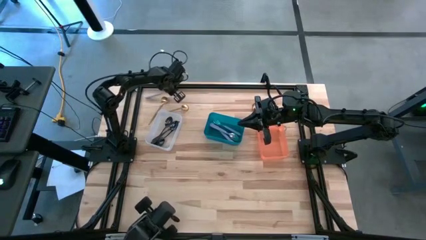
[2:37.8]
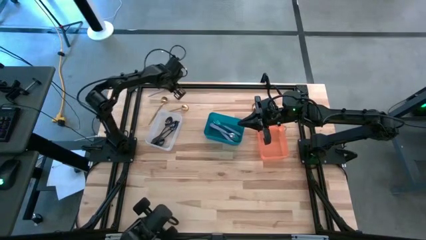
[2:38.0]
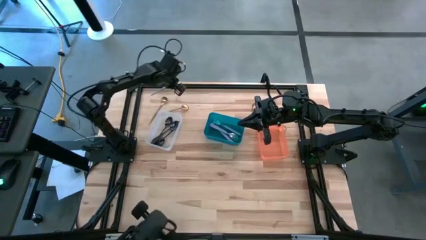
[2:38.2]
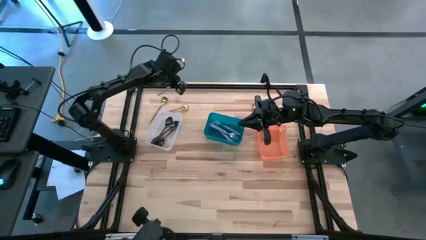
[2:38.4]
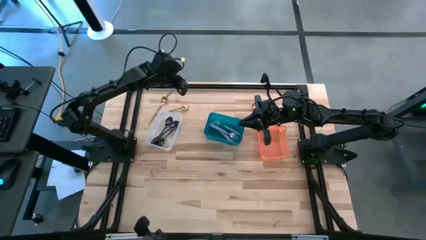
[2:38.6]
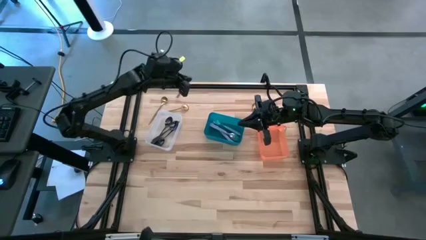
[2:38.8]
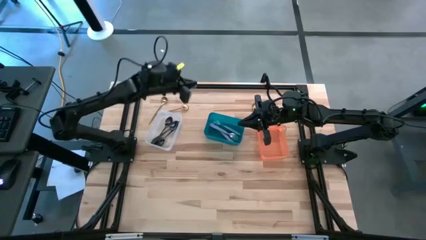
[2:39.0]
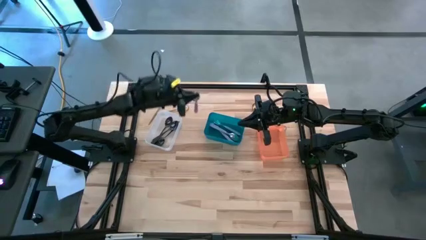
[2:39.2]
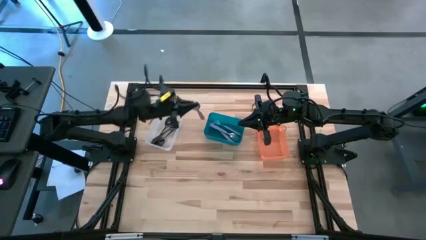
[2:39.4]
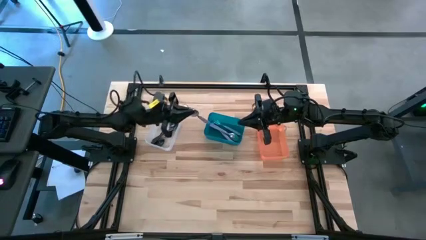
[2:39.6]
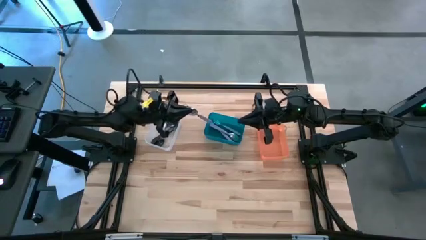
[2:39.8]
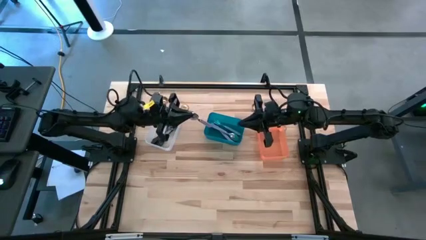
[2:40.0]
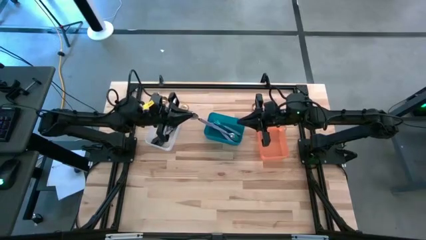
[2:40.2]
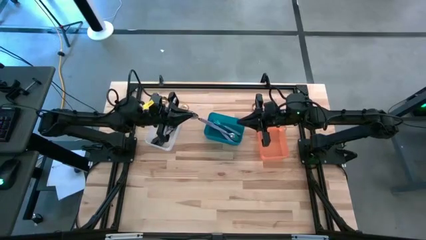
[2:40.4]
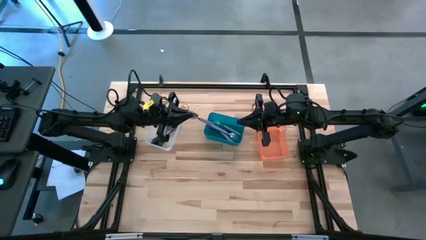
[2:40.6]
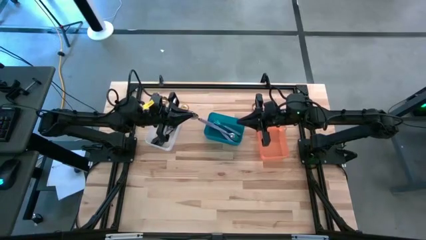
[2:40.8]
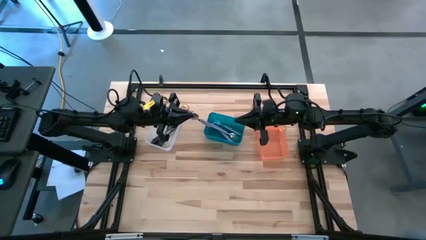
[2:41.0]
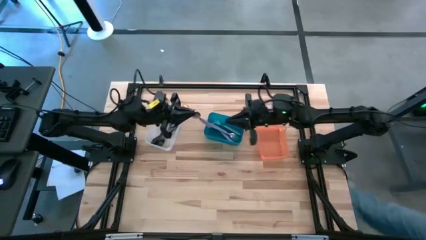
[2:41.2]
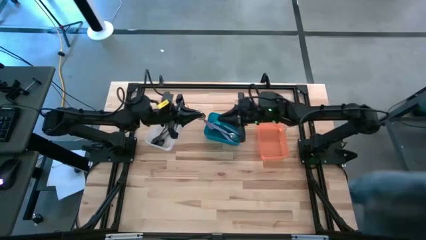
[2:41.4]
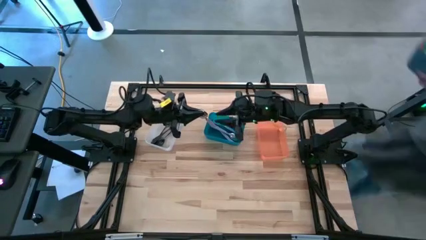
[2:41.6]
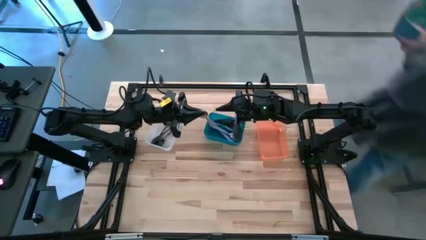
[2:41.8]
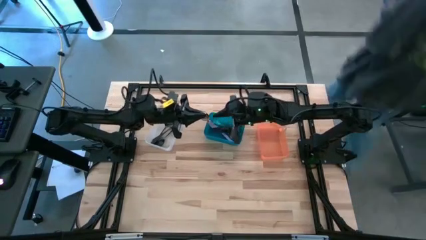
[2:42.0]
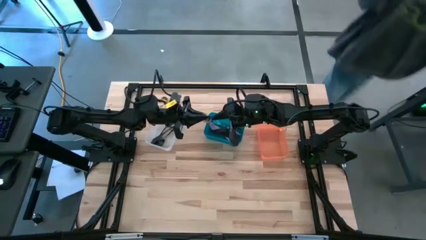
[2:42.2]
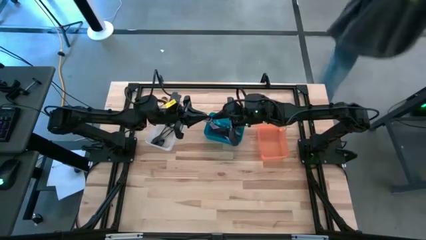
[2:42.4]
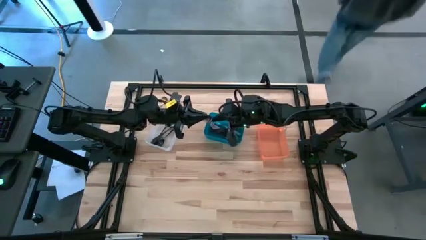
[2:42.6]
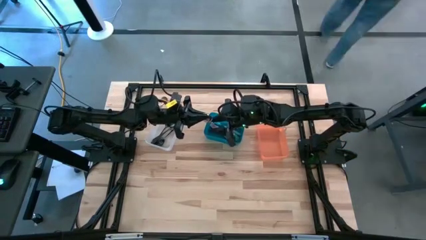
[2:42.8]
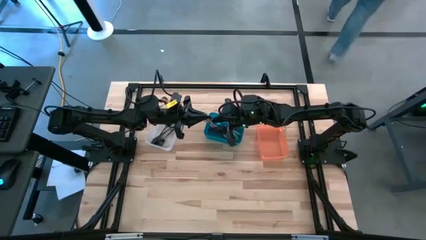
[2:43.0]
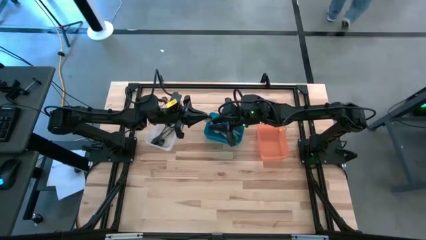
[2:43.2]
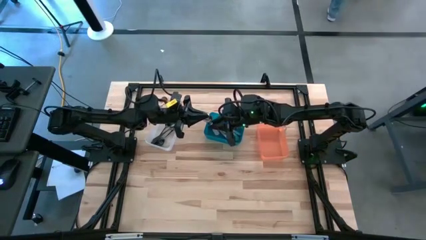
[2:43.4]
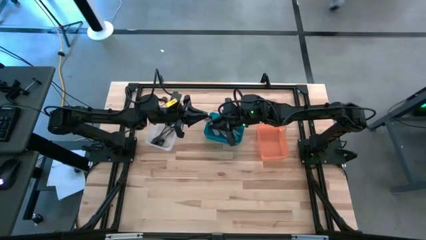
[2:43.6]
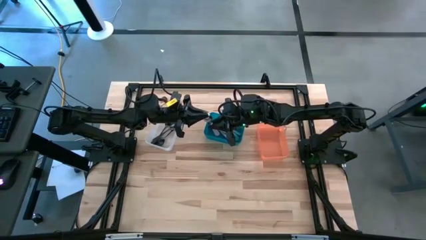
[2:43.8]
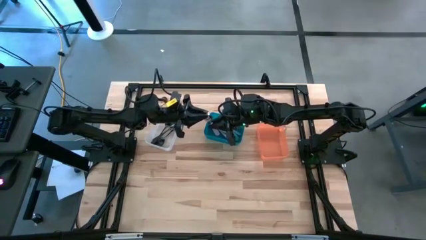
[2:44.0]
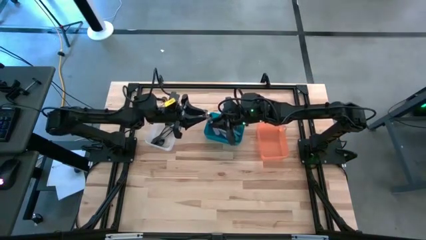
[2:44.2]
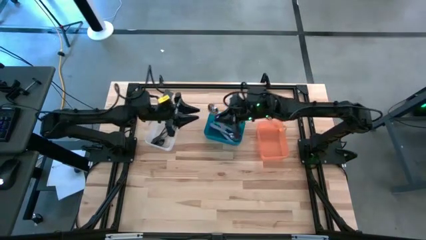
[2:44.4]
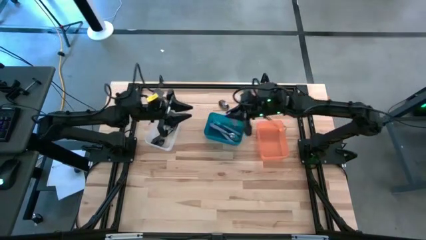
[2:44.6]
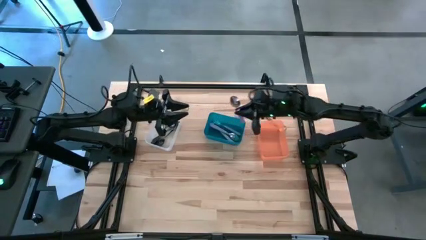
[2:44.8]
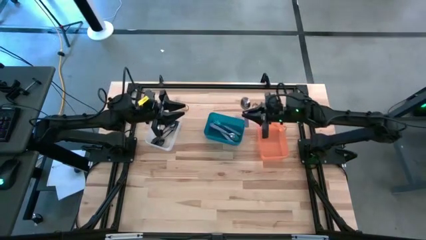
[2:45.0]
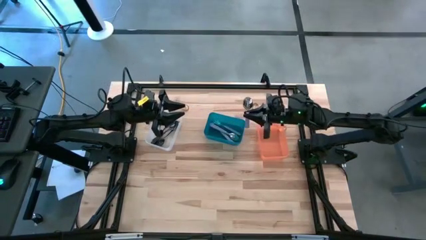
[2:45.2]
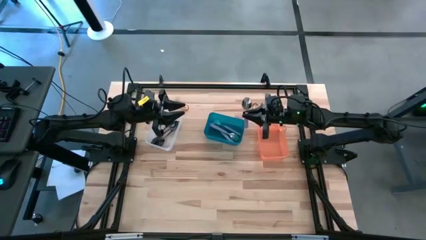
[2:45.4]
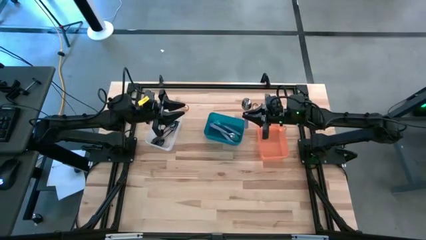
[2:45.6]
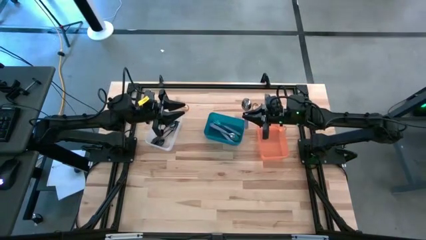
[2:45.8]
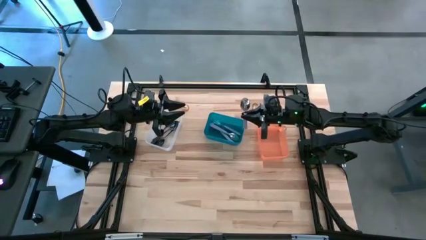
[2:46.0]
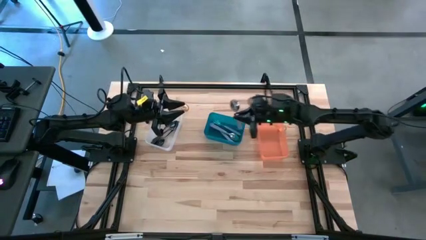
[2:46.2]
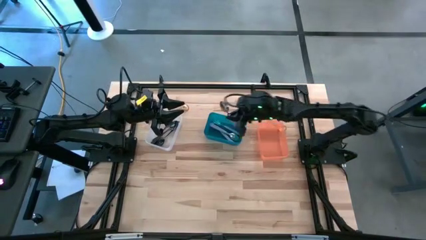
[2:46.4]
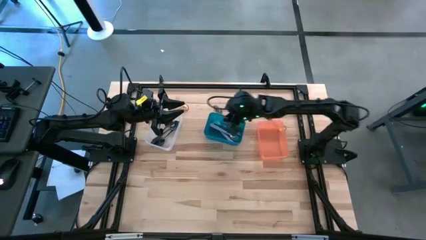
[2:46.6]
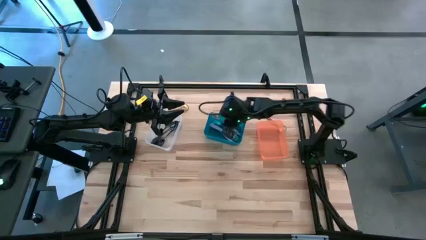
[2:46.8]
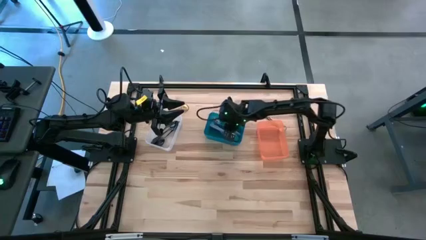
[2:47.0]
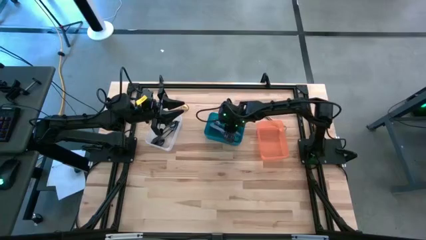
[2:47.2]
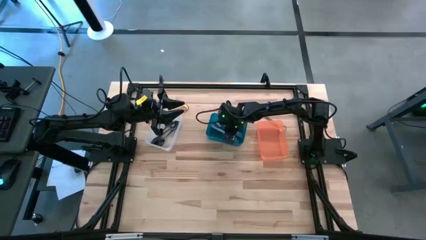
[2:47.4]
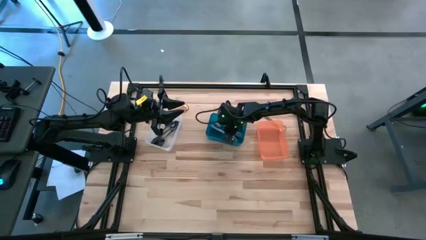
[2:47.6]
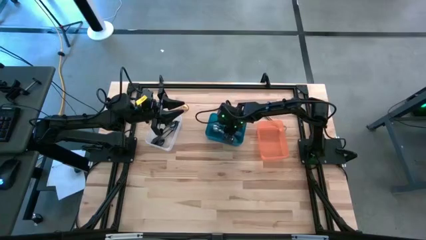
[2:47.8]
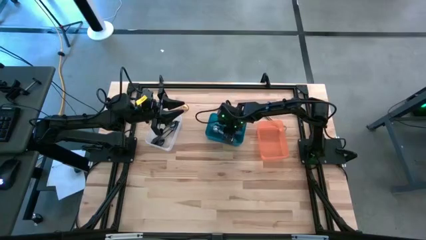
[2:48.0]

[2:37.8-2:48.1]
Task: Sort silverware by color (type)
Put the purple spoon into the blue bin

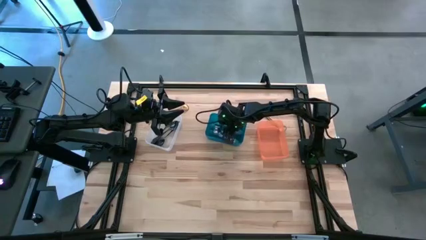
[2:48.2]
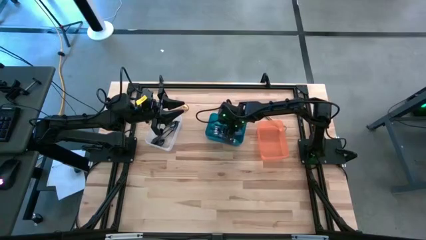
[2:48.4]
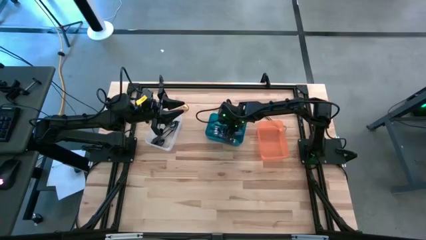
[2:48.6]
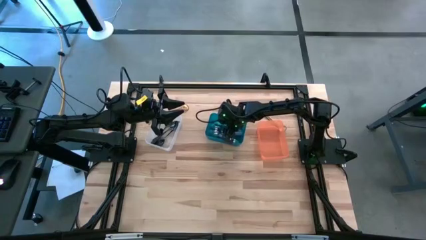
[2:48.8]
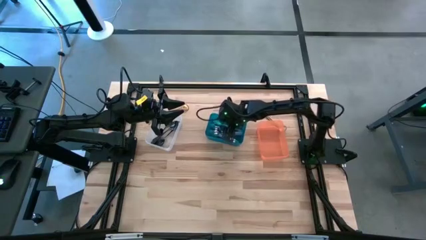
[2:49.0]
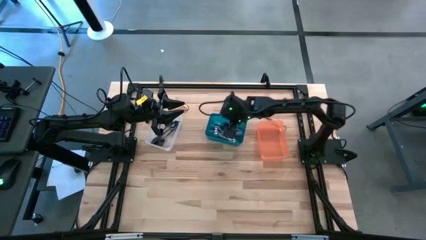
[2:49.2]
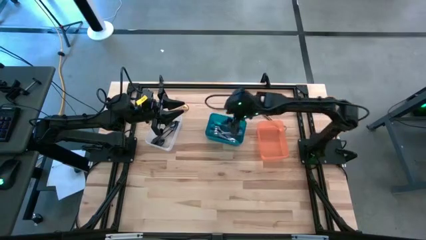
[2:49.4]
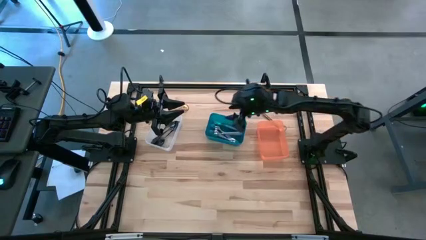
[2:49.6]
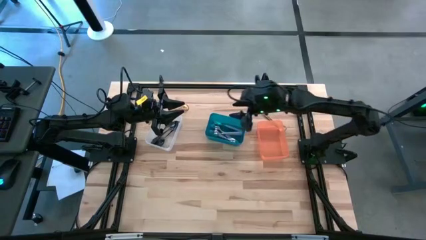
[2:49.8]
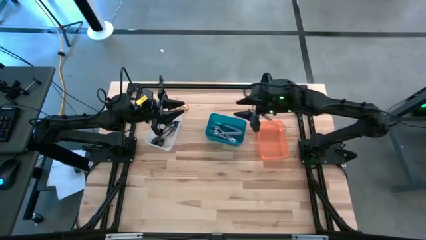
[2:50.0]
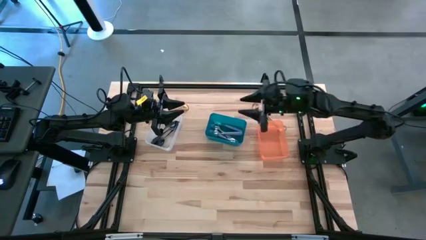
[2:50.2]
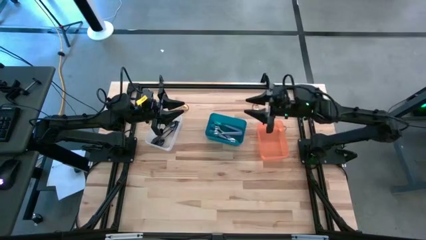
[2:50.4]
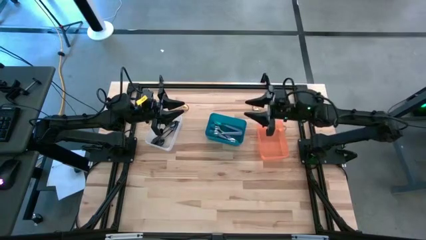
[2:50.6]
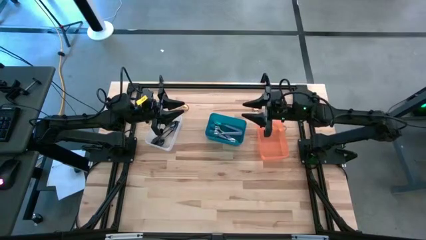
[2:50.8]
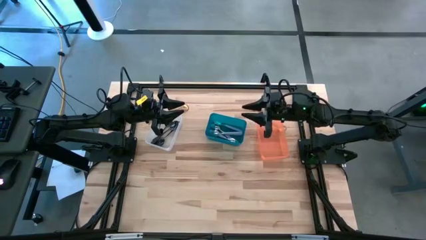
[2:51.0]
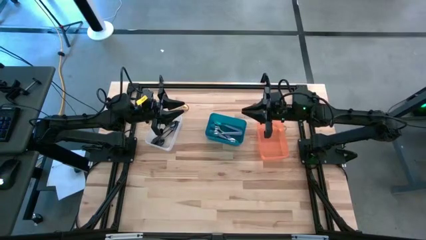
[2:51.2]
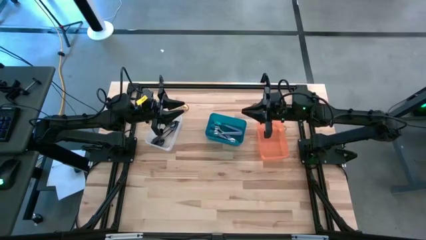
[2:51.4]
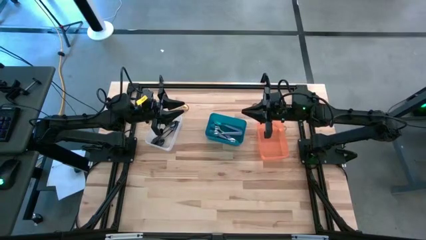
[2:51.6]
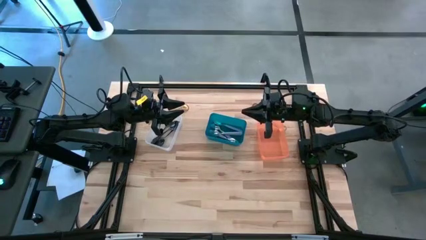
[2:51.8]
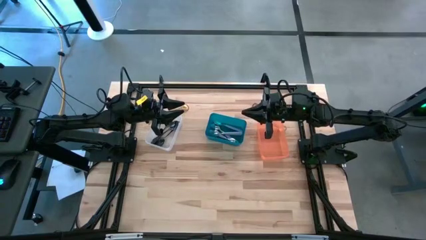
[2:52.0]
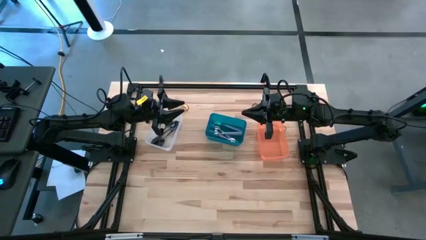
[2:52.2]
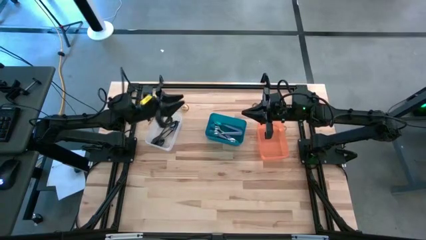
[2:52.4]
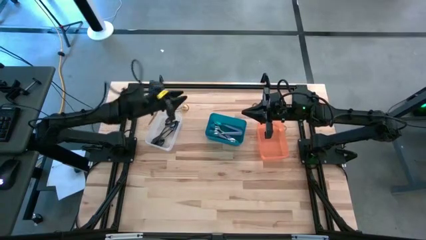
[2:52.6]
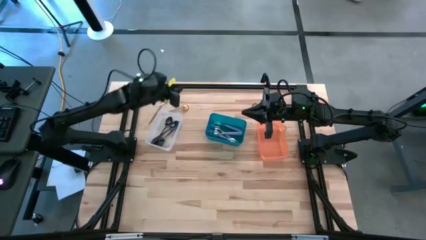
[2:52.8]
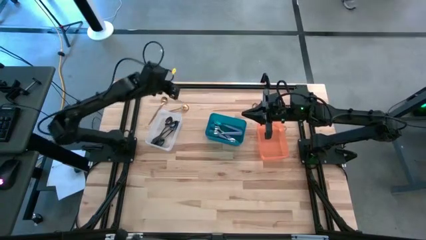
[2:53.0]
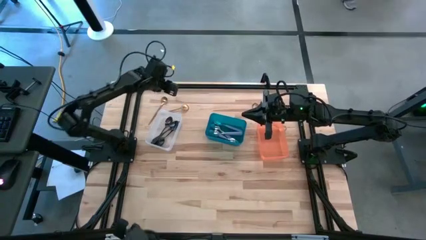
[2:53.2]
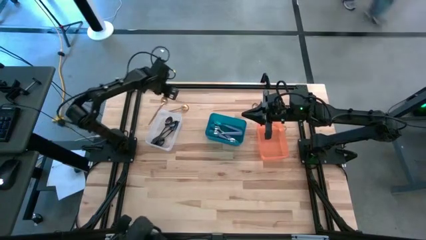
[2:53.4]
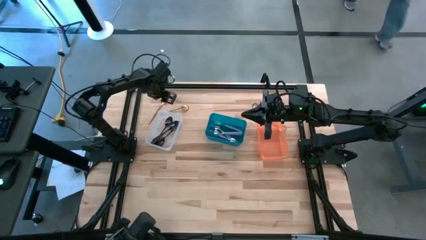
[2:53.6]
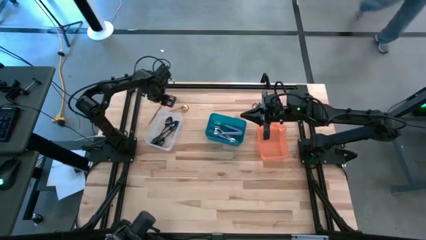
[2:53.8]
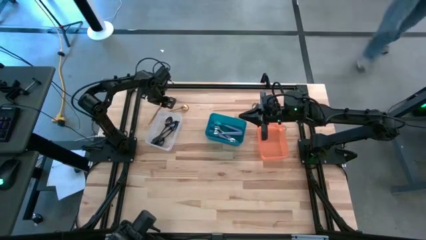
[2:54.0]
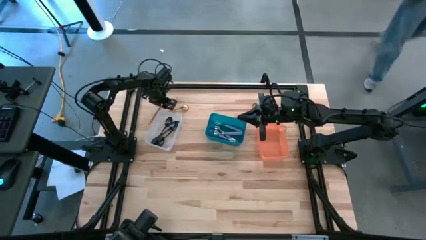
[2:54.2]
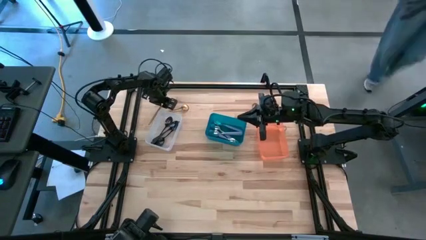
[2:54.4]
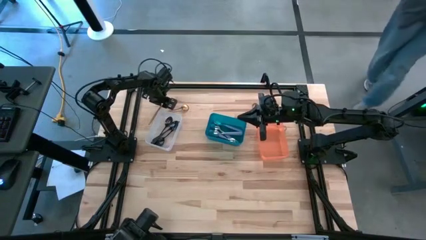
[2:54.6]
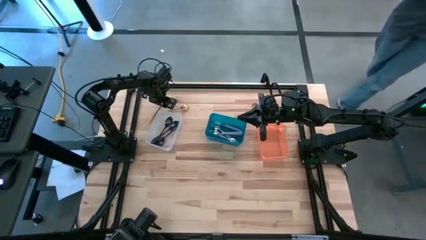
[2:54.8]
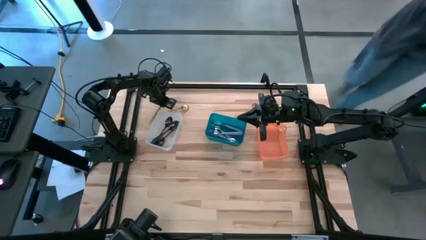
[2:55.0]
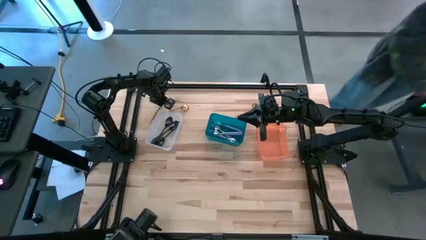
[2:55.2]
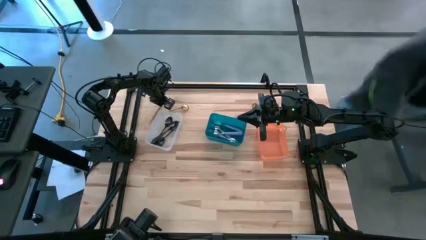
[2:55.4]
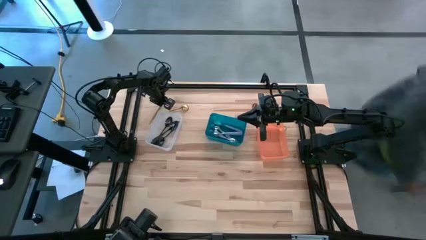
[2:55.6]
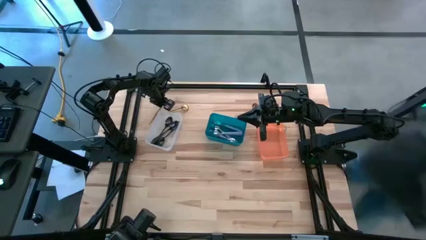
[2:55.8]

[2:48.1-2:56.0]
Put the gold spoon into the orange bin
